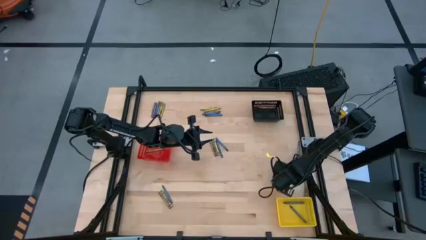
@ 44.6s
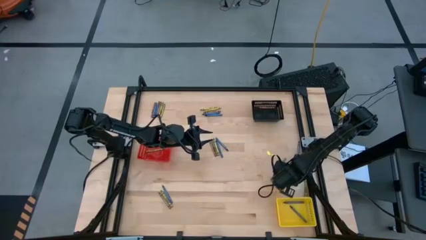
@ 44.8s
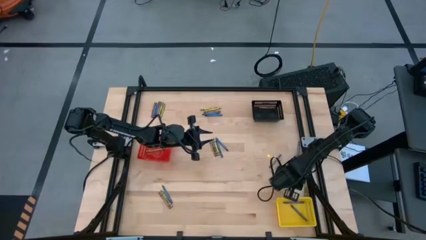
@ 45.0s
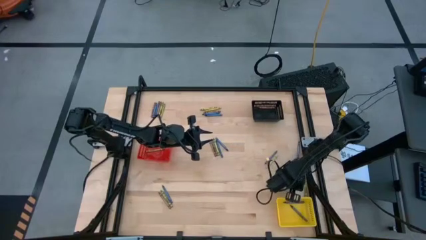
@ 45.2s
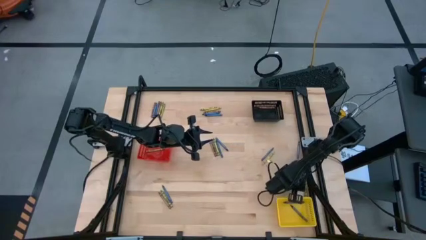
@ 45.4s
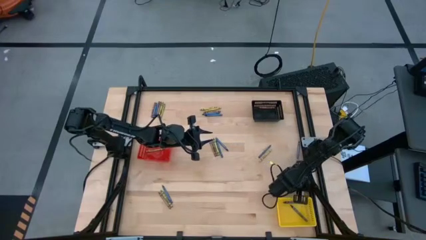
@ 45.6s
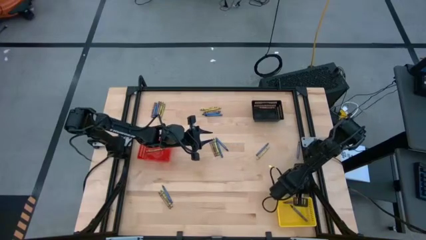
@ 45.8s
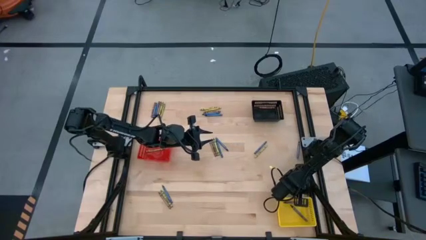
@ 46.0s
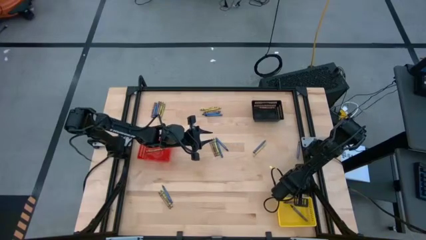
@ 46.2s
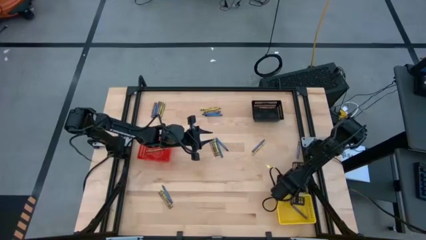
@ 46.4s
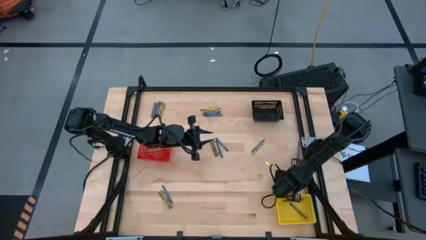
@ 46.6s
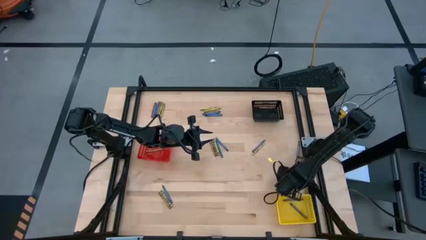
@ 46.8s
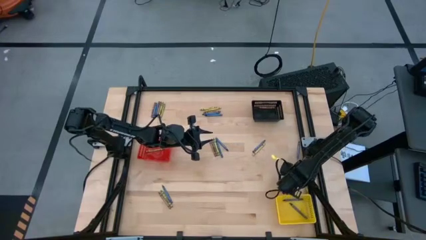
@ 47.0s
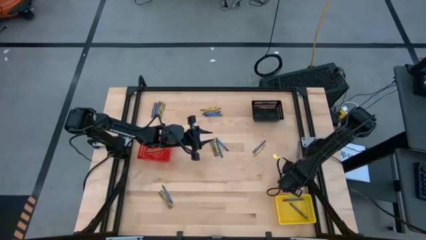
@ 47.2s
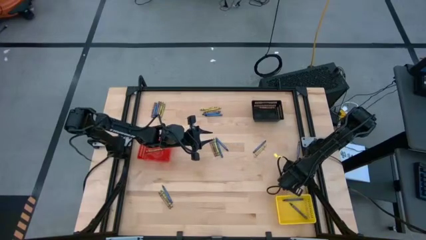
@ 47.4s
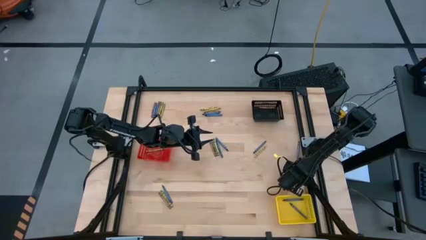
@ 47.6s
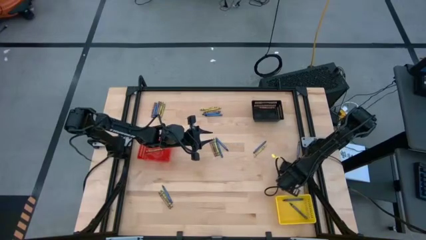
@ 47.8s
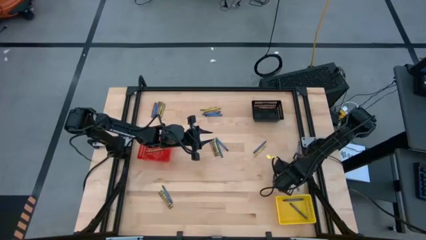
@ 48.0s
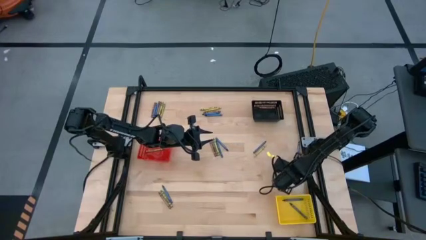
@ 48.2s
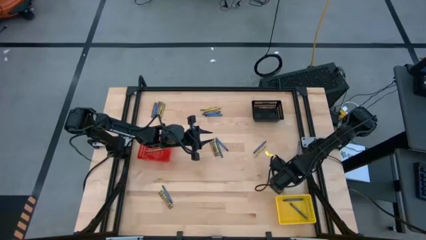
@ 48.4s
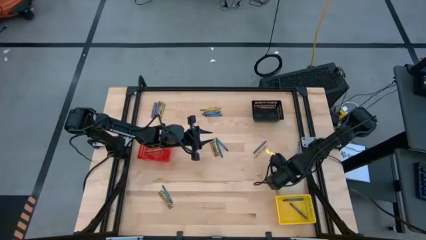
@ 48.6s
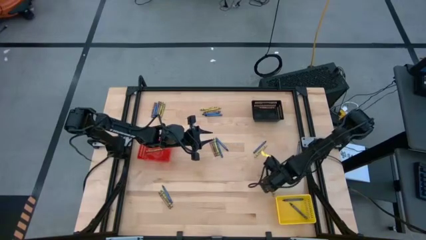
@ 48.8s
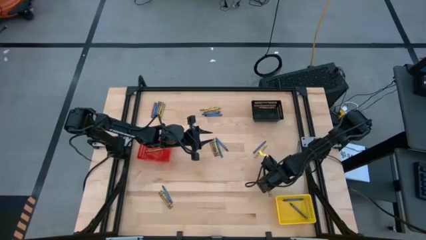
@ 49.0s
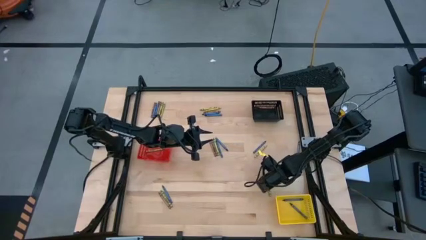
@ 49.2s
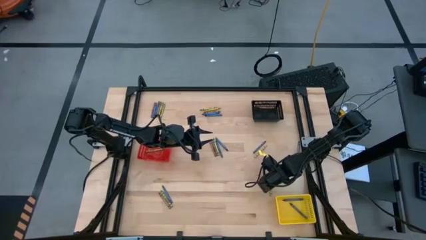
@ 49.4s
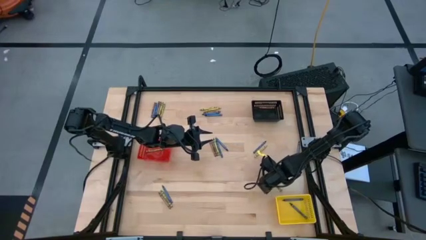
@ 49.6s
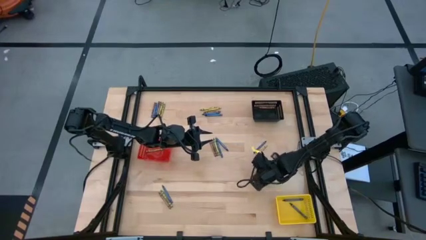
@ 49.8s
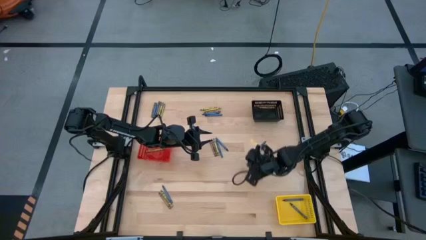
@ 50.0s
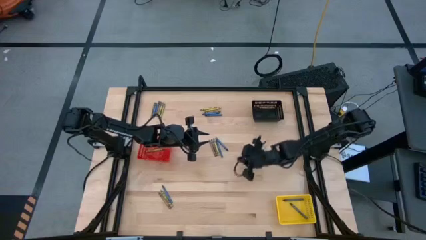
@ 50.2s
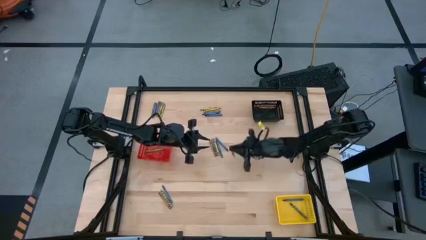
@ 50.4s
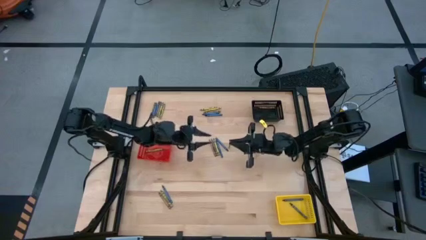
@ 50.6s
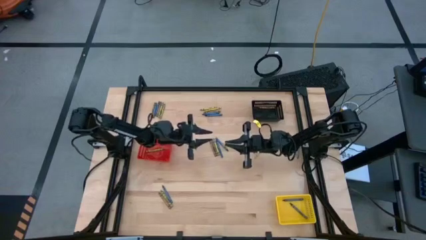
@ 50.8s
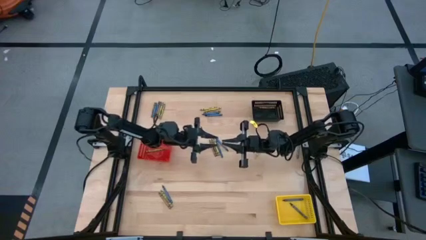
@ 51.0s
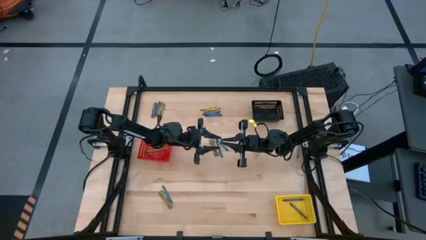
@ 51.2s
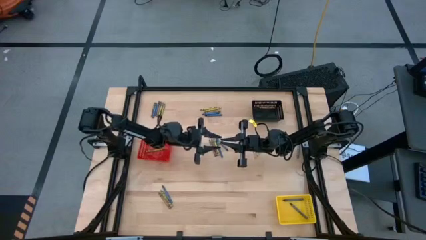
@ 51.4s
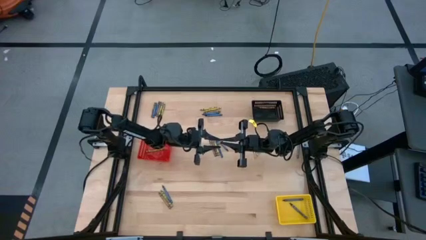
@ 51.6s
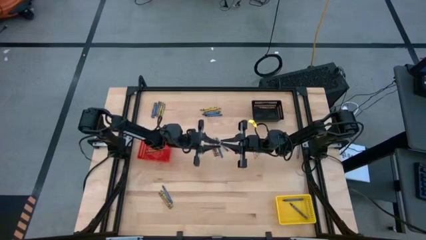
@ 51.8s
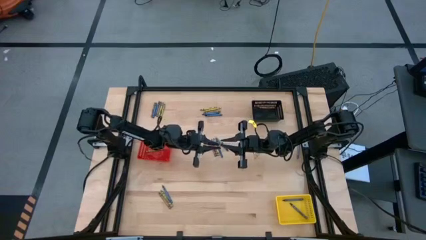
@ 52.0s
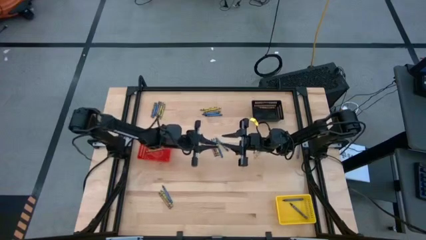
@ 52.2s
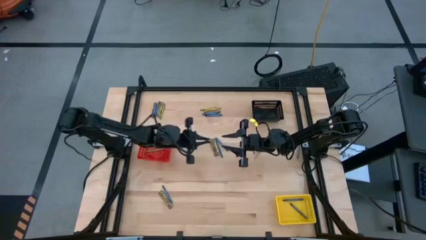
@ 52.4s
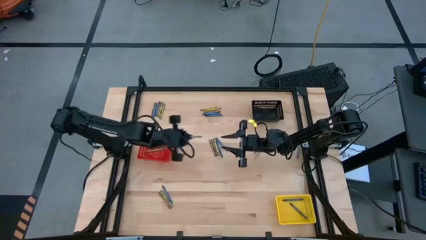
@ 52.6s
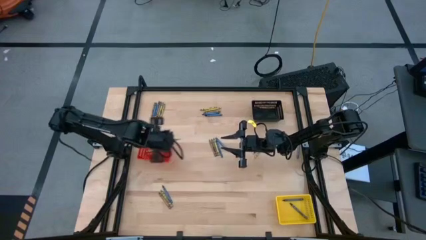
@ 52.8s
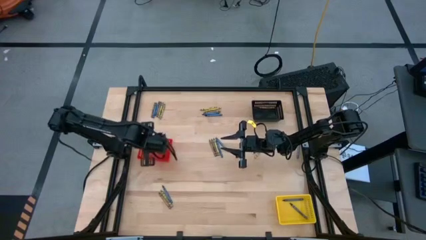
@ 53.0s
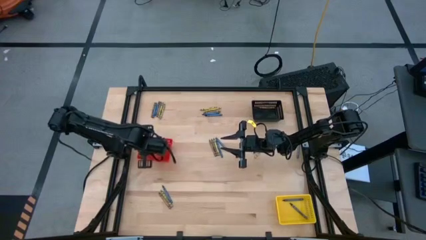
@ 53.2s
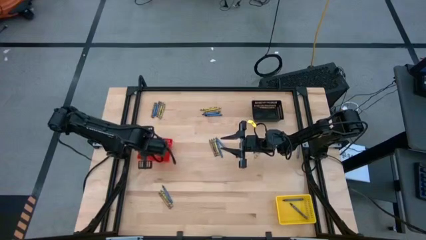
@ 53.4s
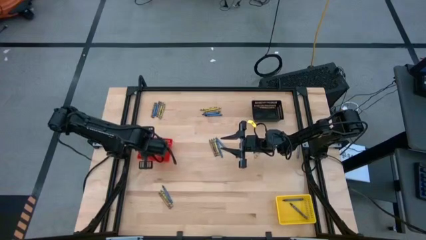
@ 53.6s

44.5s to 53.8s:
Task: Sort crayons
Put the green crayon into the red bin

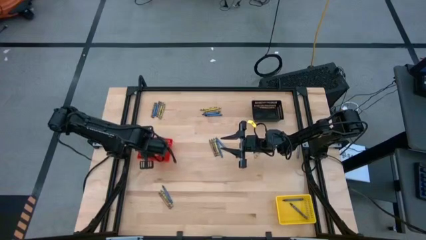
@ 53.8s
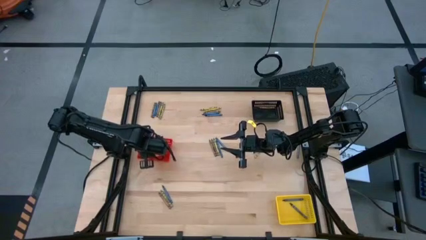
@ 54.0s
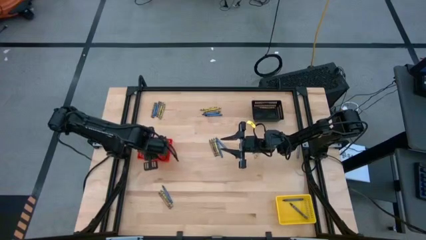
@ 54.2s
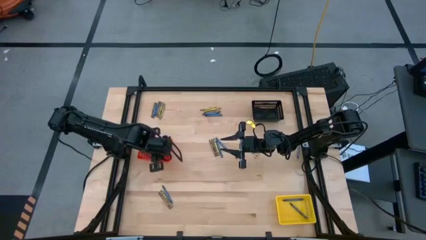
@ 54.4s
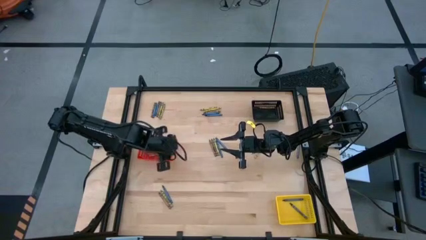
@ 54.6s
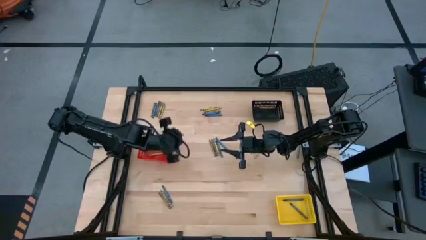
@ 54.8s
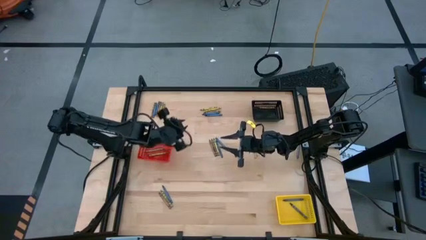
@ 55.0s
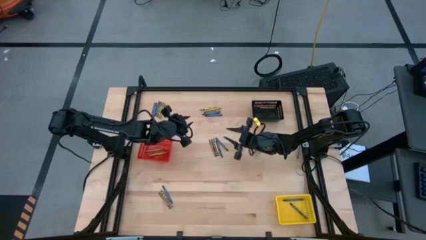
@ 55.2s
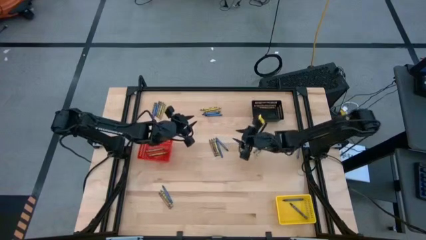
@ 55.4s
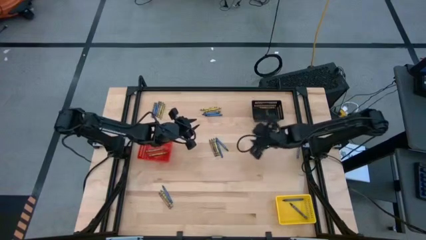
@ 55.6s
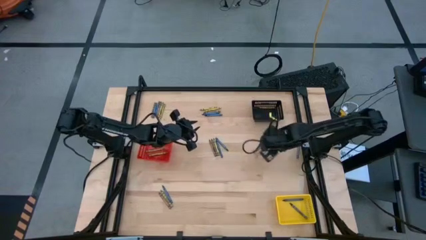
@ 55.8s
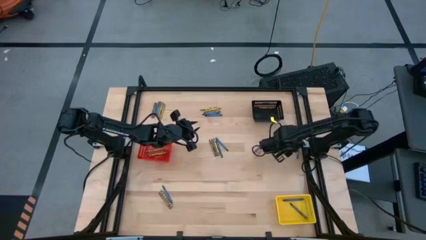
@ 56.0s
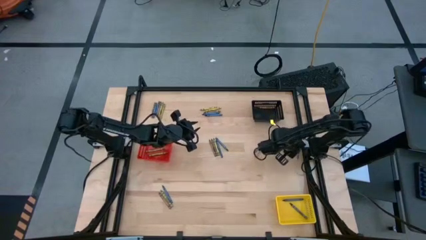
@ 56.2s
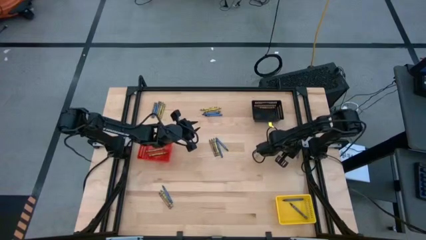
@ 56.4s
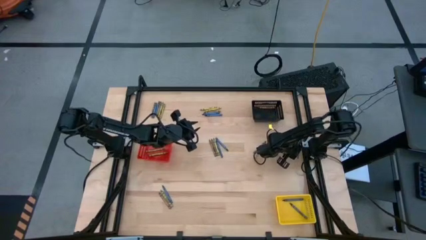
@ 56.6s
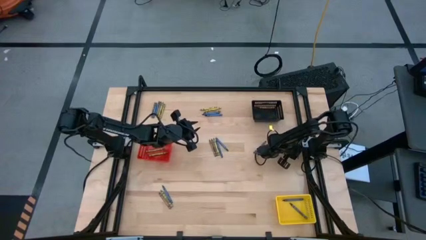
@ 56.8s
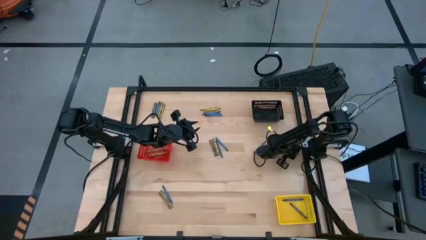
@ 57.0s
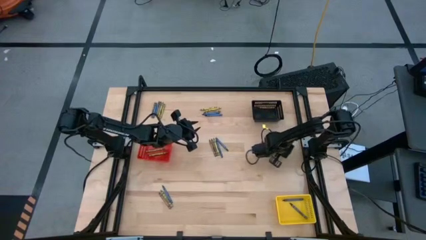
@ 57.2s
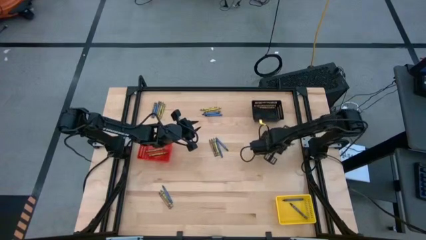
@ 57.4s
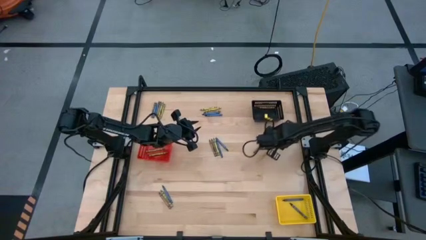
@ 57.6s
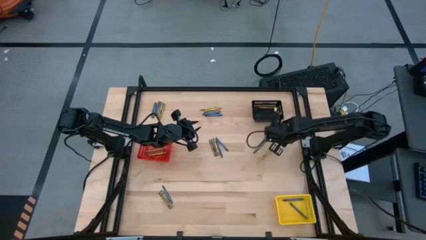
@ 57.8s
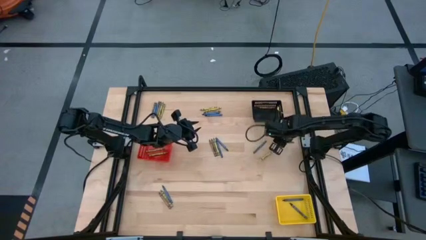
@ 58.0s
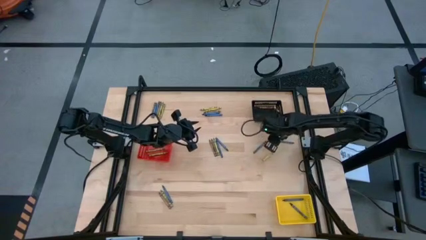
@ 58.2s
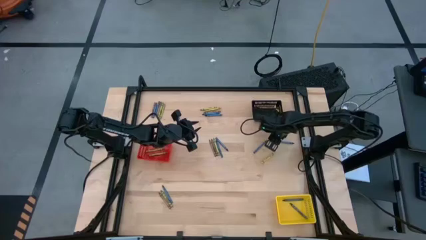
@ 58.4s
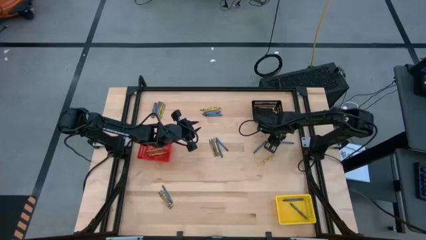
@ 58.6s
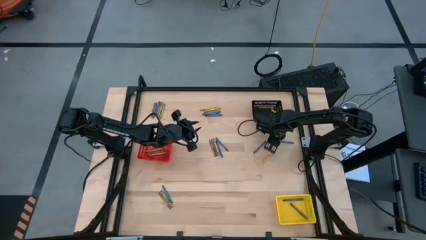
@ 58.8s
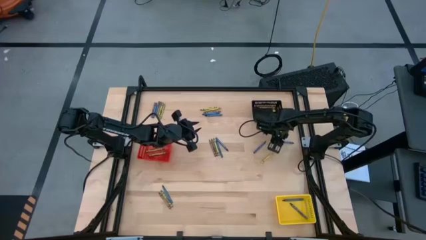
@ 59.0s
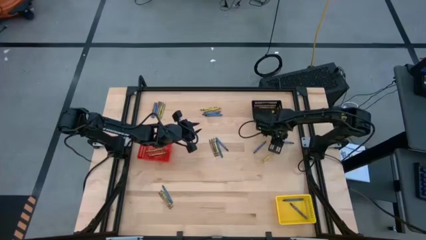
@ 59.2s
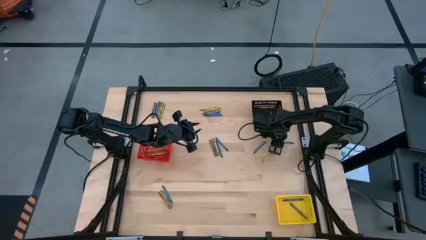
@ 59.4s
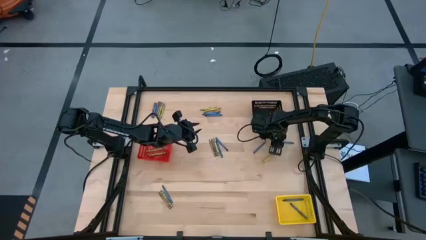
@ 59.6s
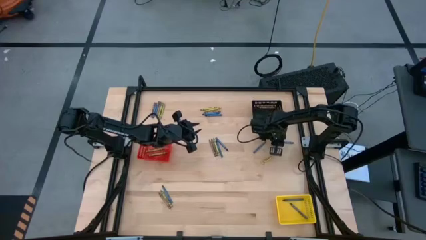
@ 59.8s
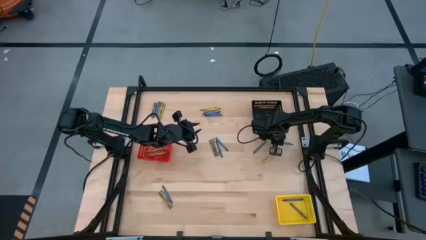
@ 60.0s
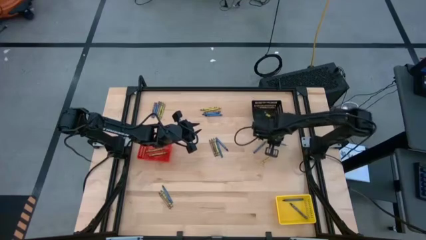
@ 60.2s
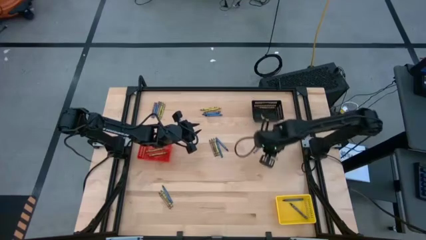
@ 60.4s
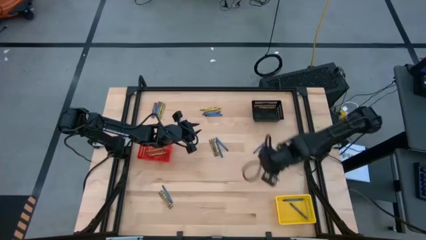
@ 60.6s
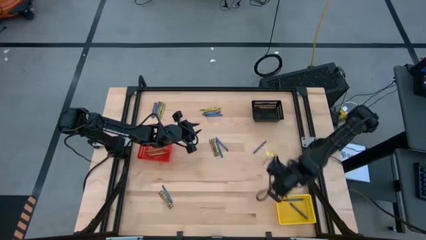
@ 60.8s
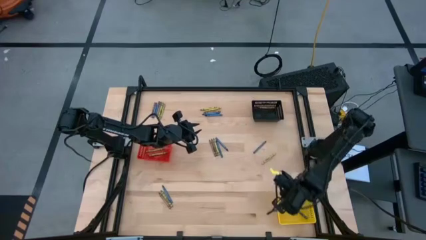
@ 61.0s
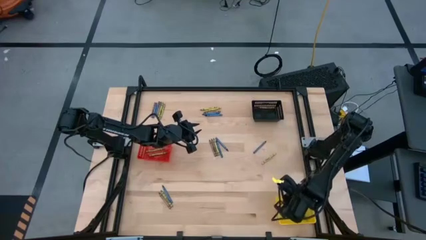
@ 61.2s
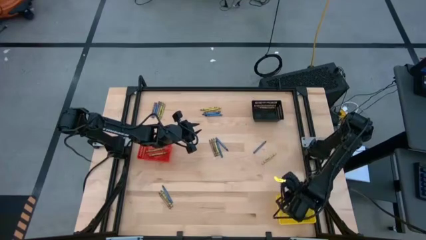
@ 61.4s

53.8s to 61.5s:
Put the blue crayon into the yellow bin
